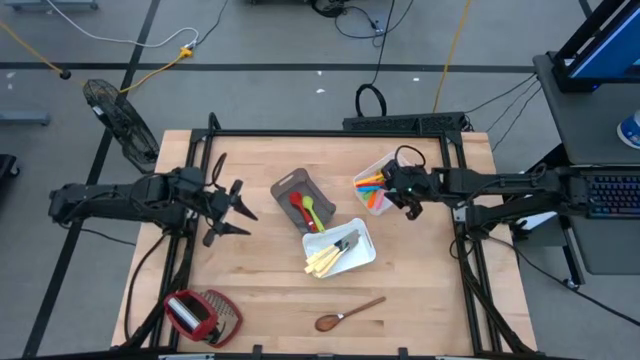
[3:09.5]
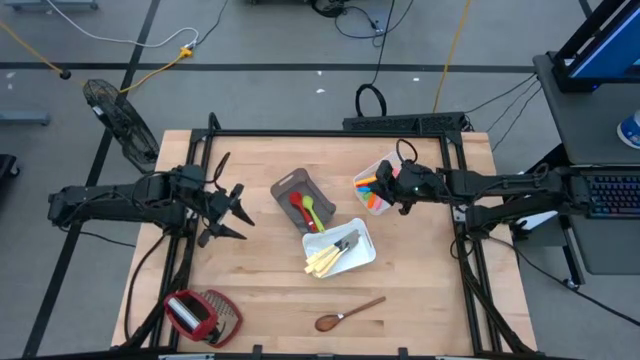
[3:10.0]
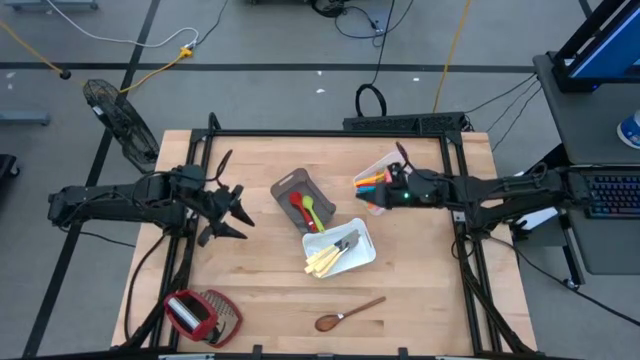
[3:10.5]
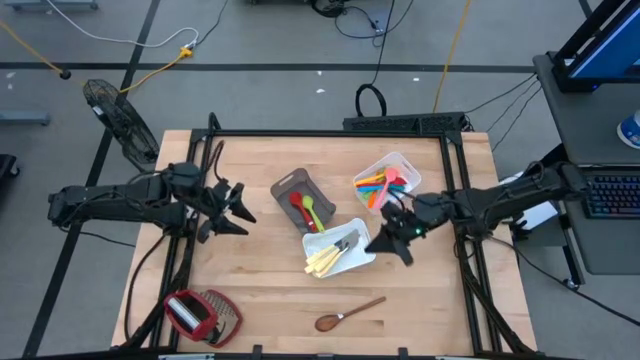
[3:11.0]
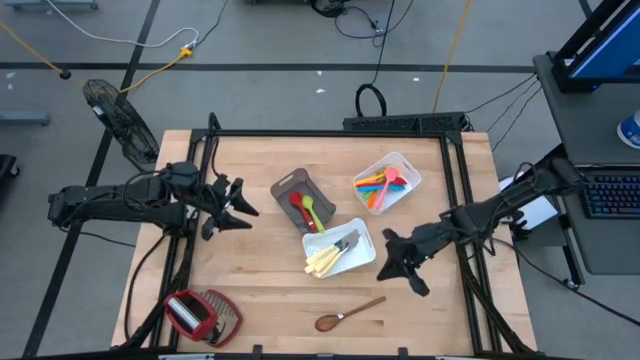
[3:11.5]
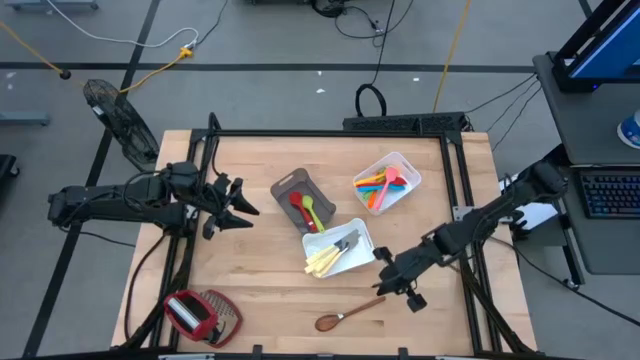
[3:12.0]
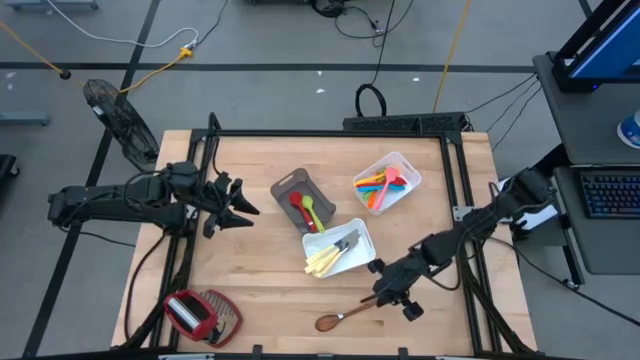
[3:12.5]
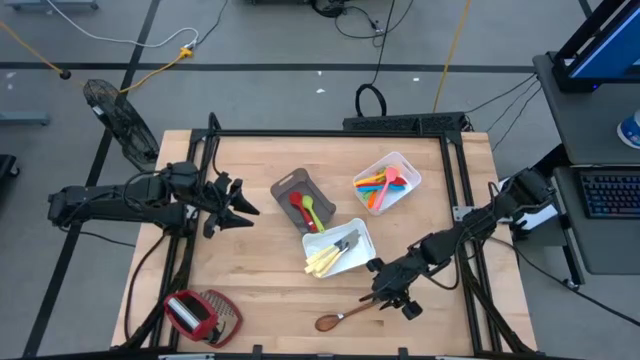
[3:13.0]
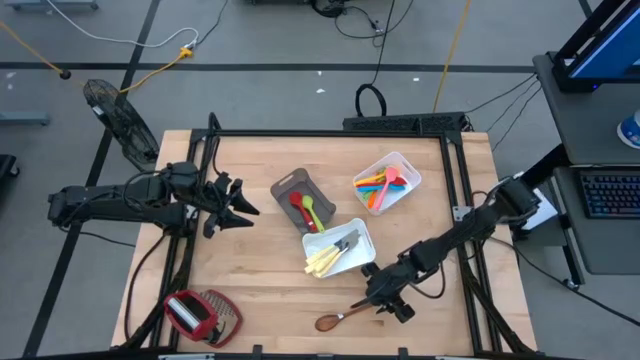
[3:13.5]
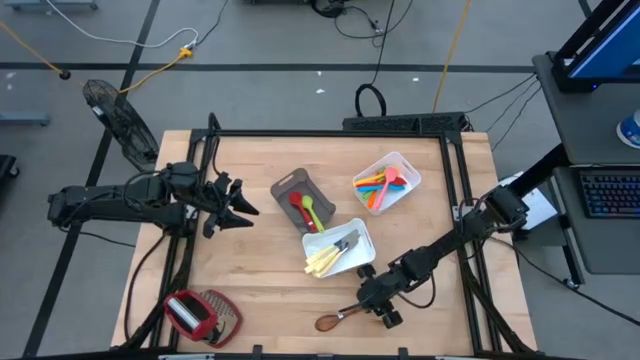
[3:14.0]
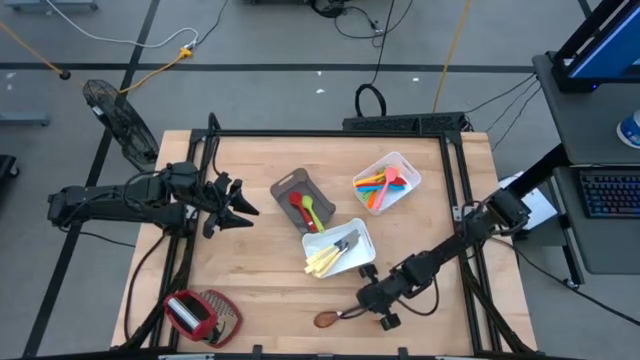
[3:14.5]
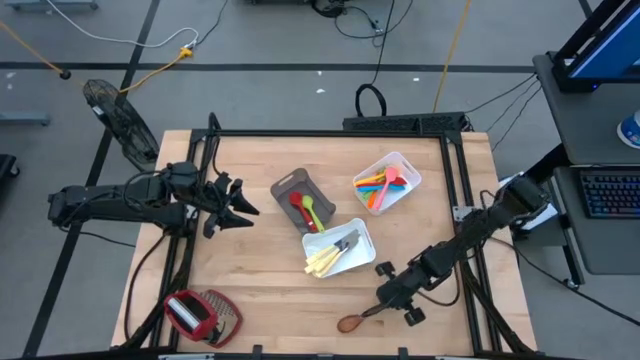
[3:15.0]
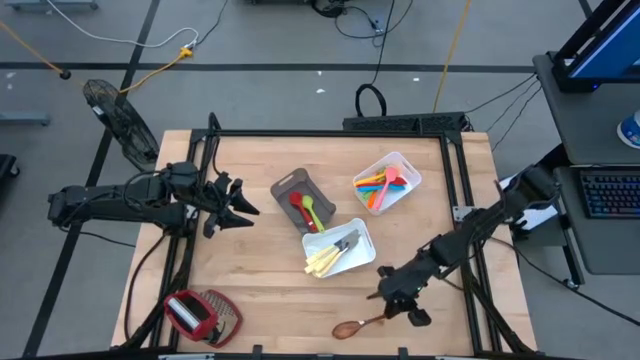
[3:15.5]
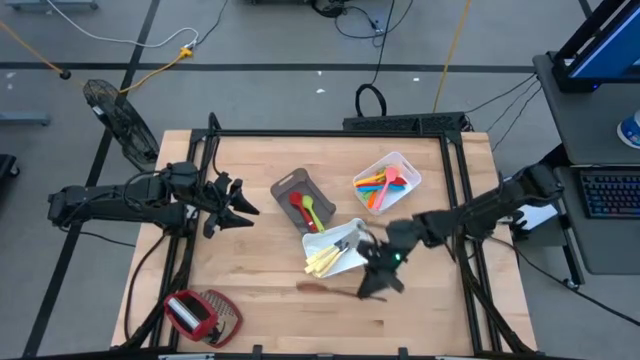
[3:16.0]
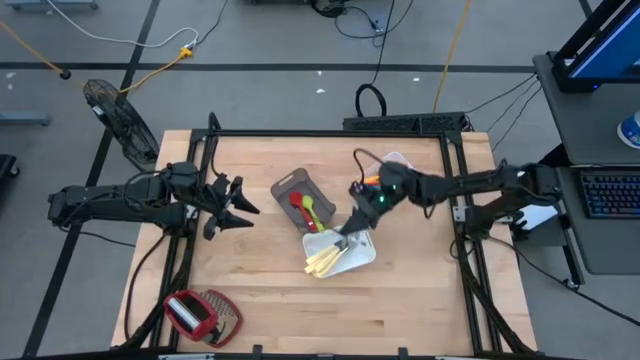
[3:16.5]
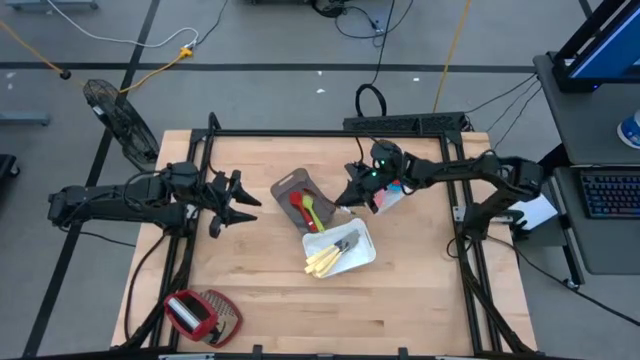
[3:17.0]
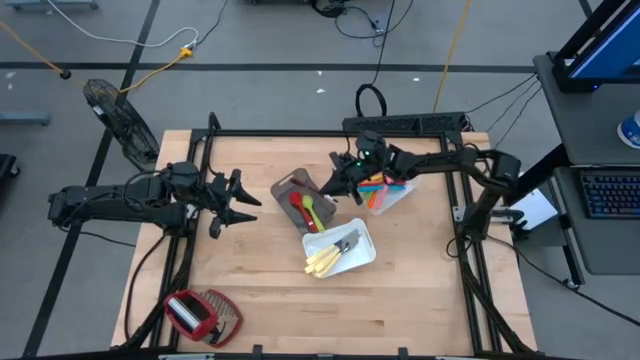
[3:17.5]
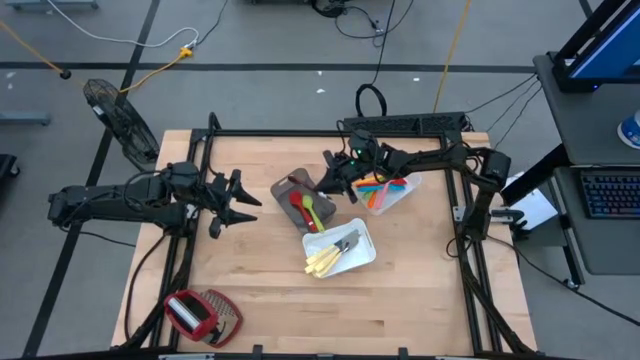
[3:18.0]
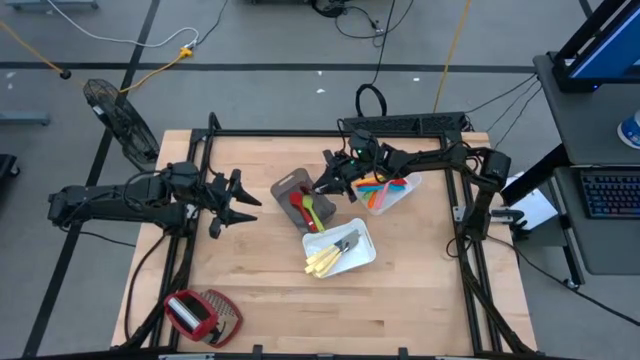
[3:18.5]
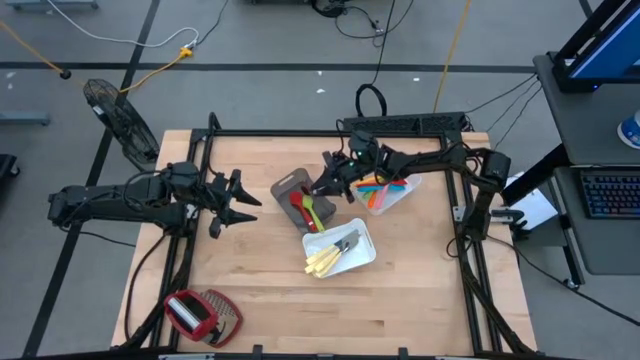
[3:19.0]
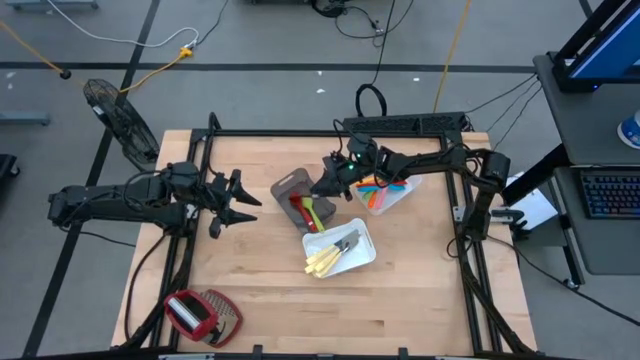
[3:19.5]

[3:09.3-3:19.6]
Task: Pick & Place Kitchen Items
Put the brown serving spoon into the black bin

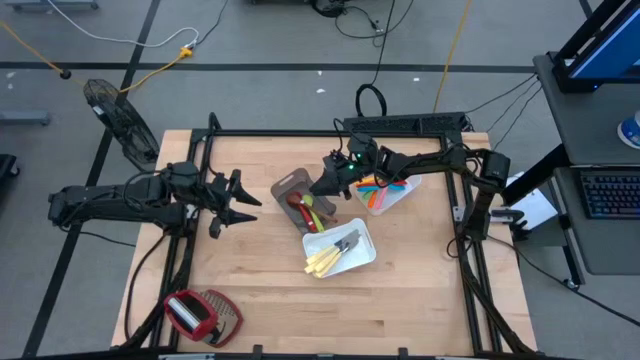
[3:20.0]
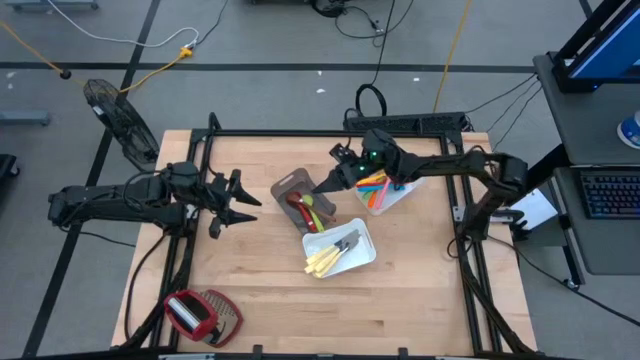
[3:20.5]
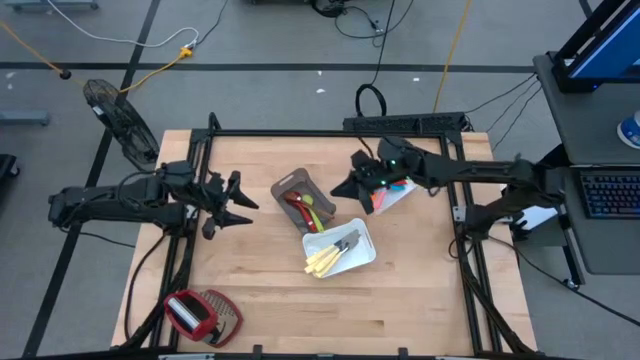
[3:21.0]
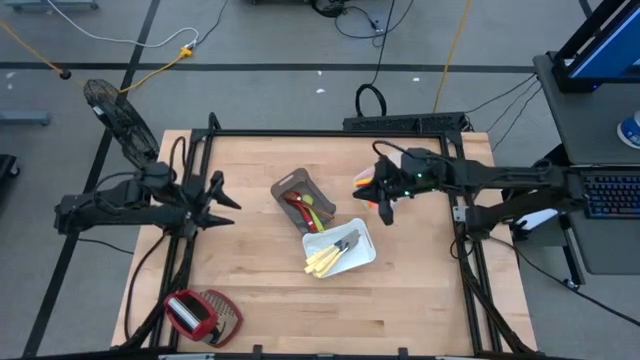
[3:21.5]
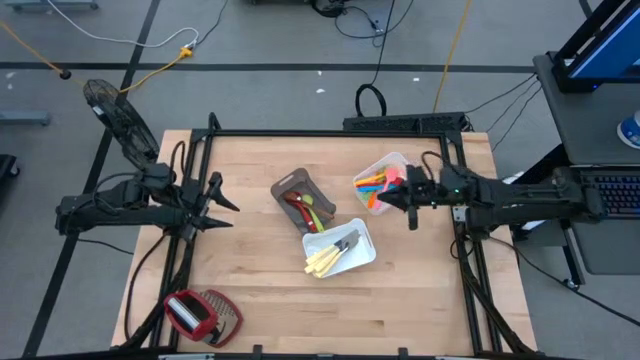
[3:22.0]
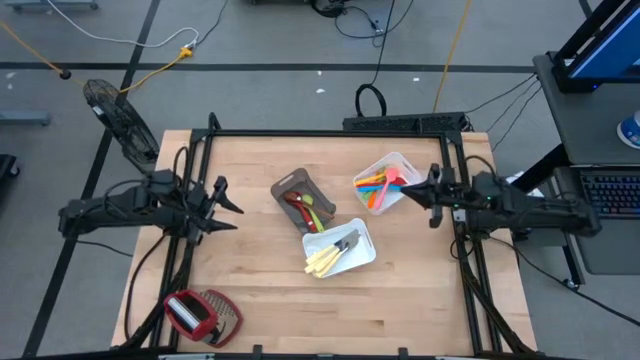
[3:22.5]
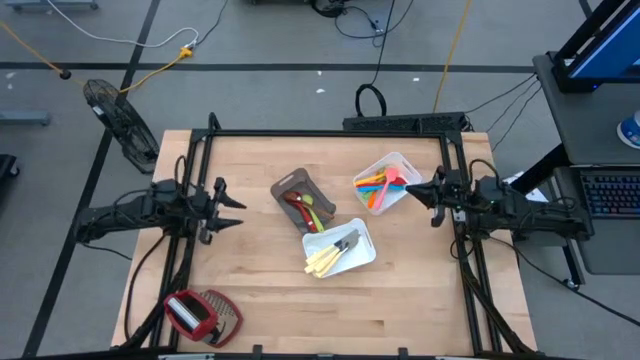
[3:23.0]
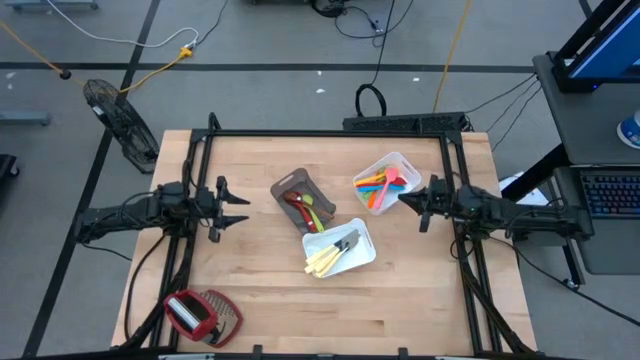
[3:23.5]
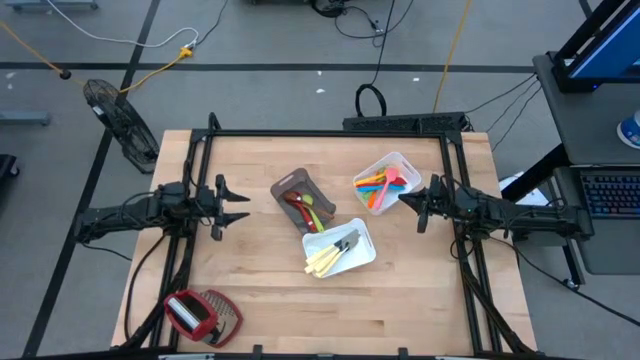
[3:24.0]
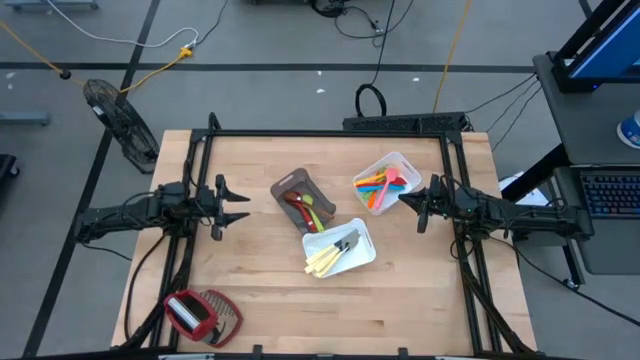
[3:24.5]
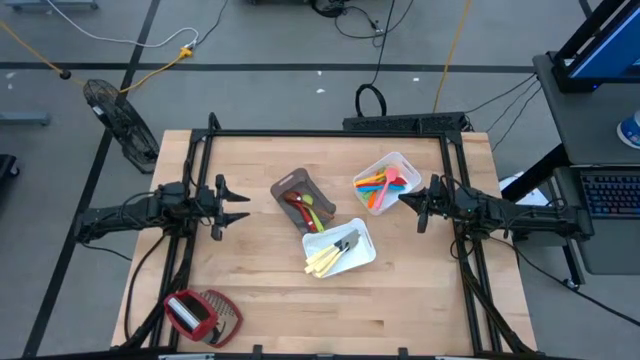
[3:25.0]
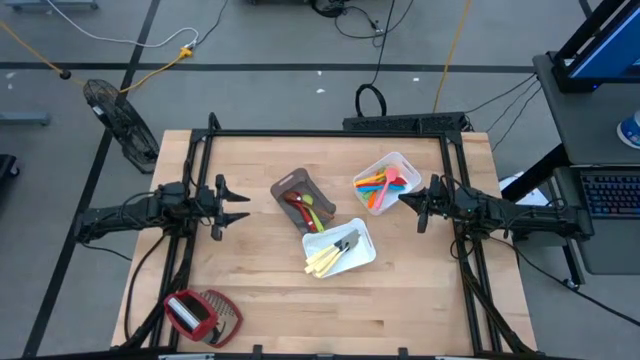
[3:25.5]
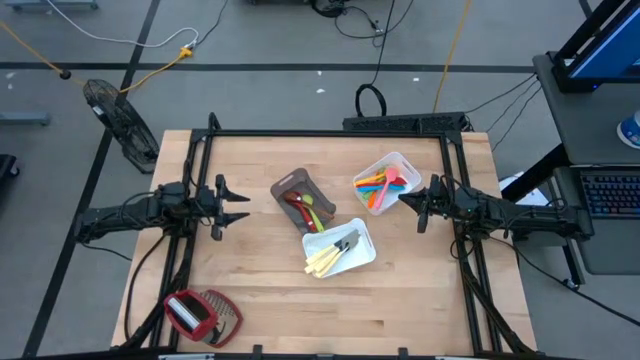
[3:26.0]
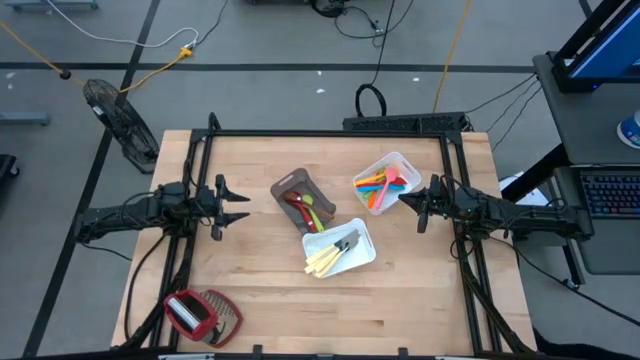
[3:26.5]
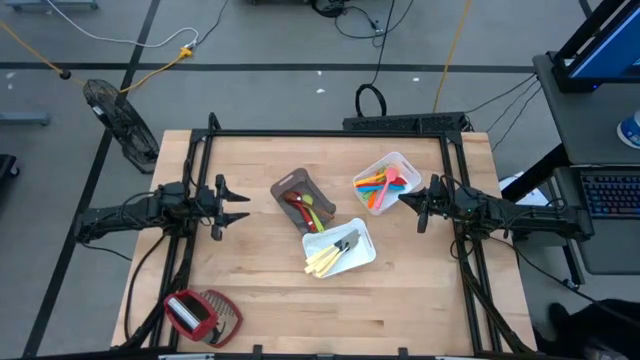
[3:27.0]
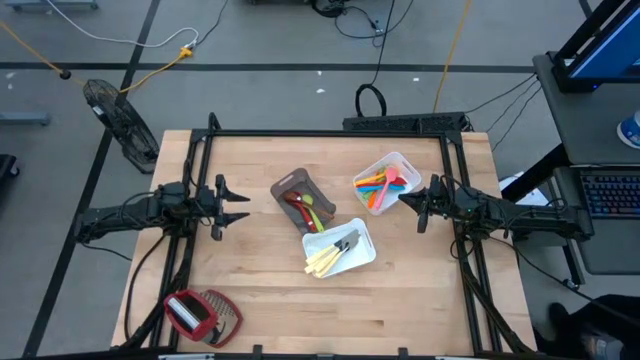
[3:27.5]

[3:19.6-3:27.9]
Return to Home Position
